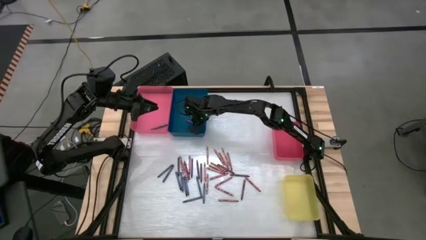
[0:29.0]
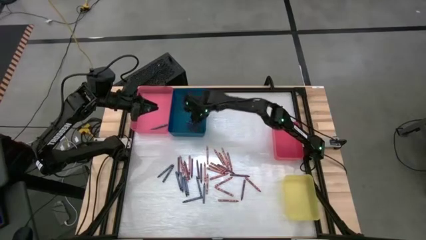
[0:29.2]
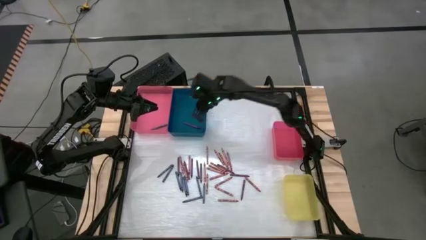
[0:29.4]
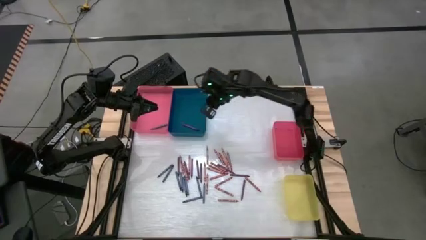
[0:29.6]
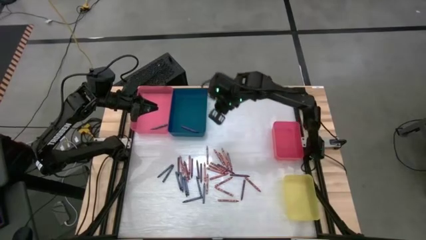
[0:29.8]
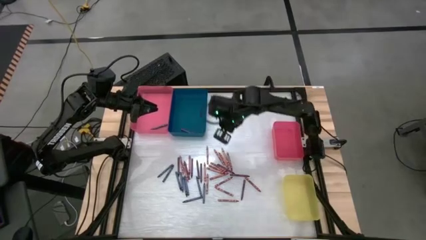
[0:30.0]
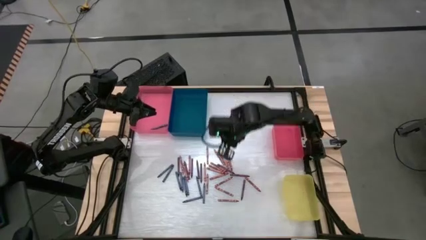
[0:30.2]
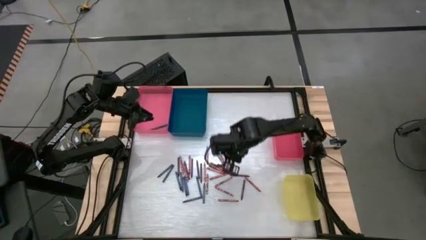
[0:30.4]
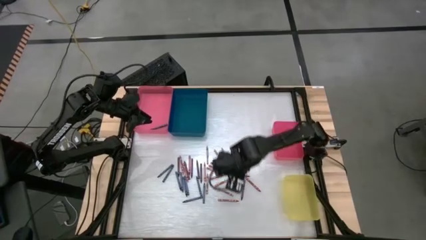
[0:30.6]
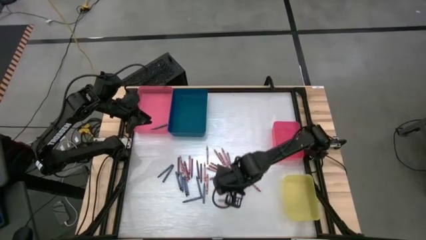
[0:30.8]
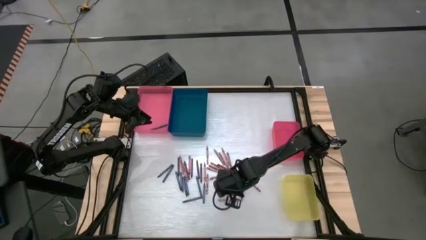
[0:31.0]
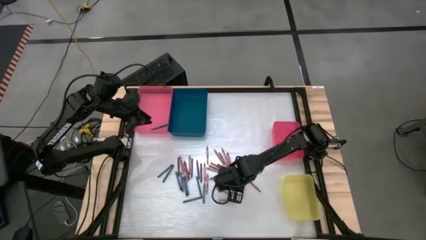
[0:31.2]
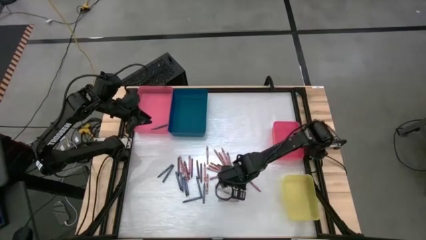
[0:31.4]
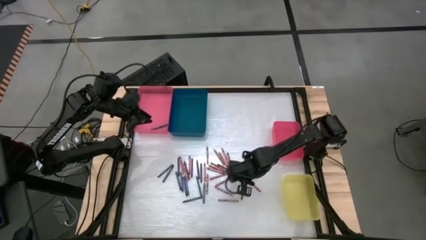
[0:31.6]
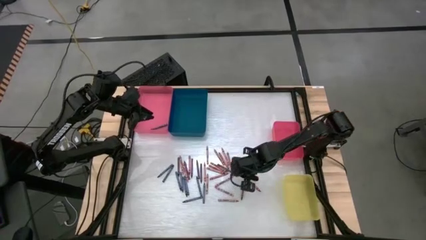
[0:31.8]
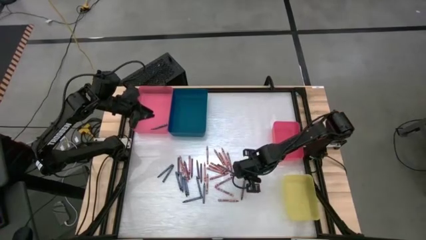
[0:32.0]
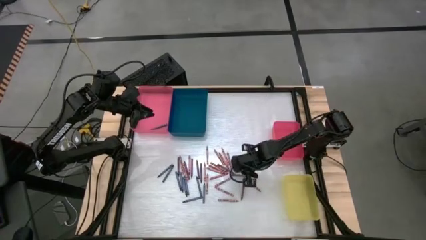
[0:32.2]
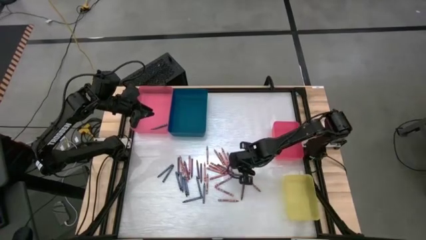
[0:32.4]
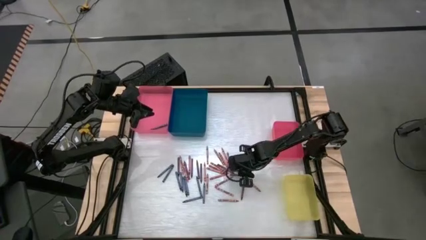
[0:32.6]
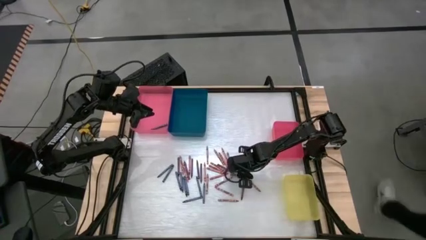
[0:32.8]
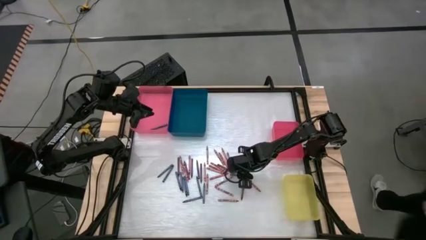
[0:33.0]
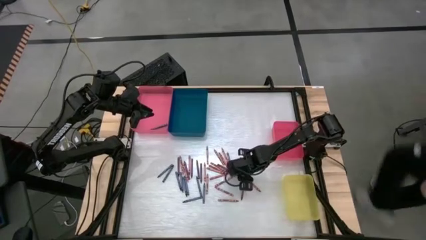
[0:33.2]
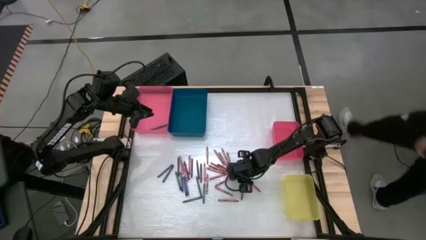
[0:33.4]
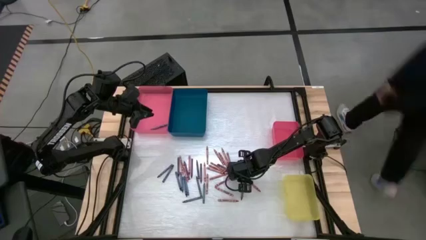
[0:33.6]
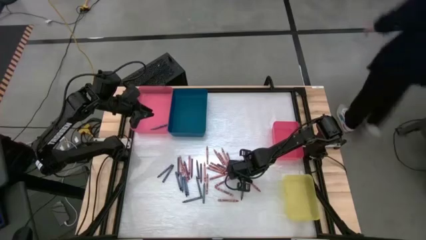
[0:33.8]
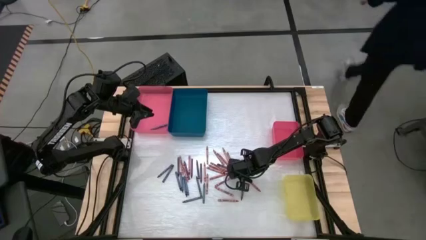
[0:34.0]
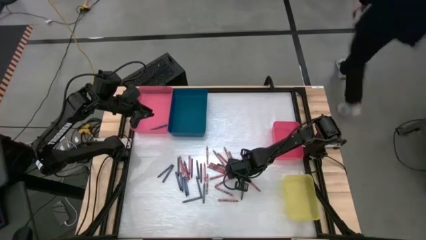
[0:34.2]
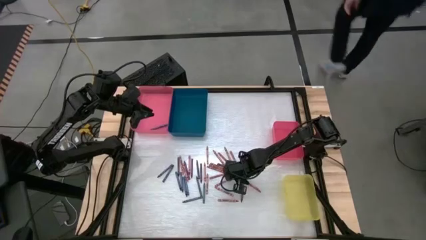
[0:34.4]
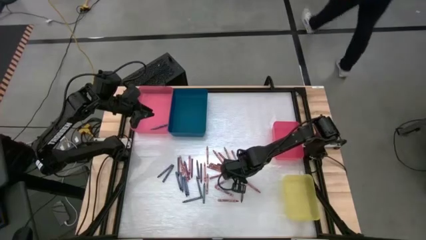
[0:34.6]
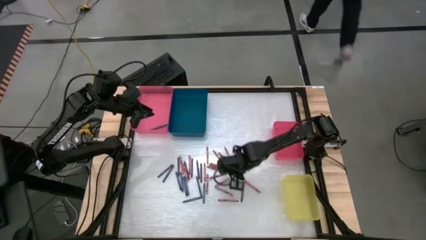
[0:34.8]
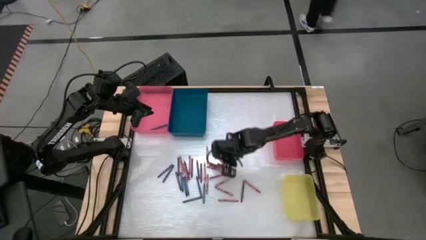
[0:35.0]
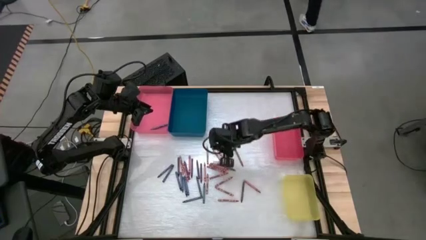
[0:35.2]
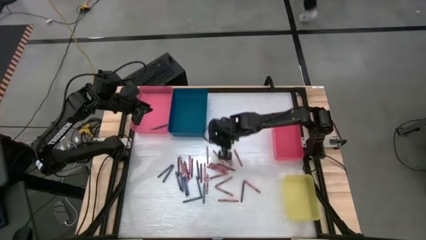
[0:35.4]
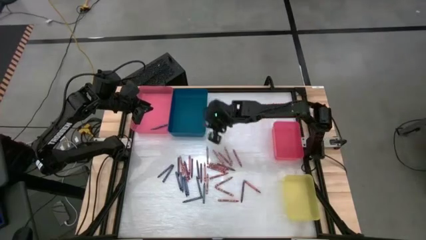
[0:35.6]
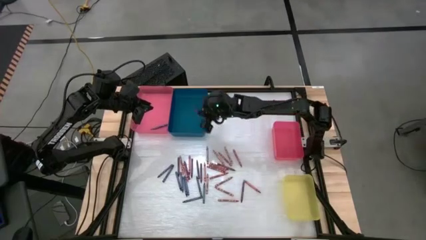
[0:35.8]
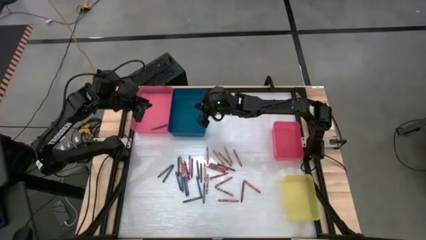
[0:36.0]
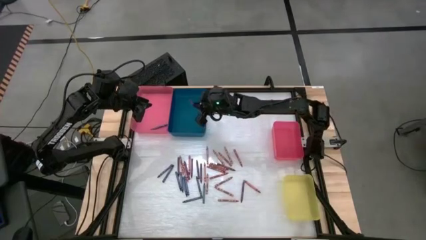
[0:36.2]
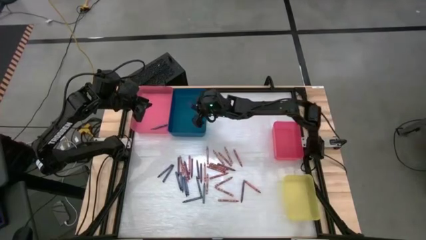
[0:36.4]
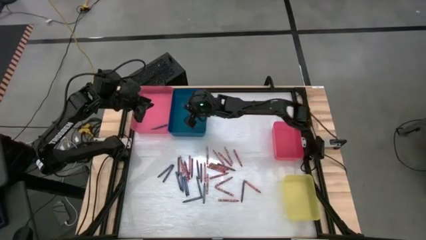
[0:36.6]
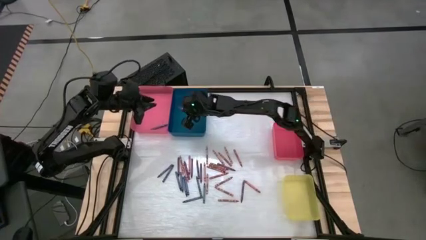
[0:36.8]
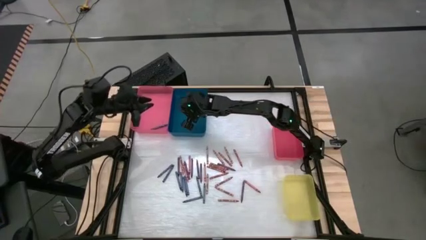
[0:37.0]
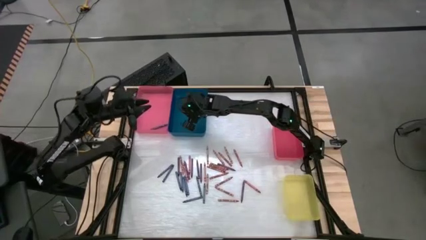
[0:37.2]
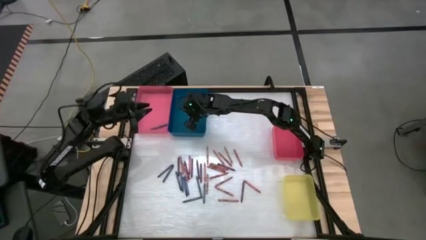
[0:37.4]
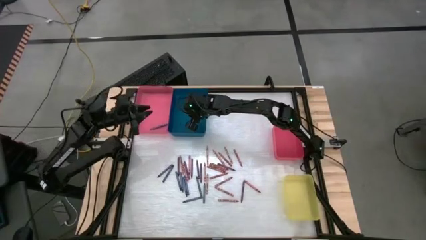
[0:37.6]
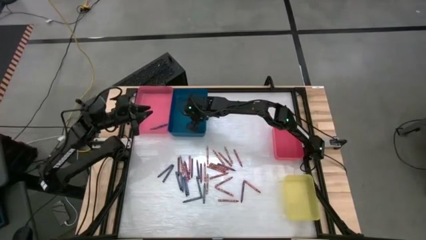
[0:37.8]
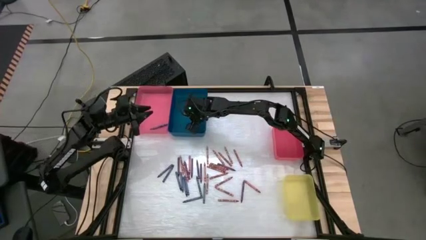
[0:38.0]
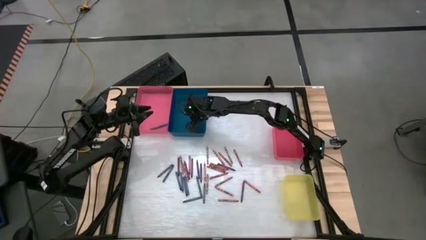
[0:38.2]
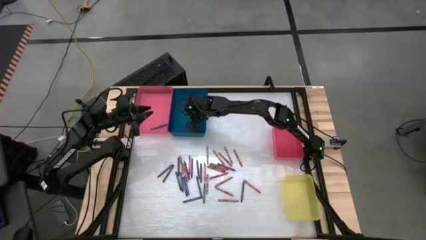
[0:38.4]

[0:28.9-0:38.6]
Task: Sort crayons
Put the purple crayon into the blue bin

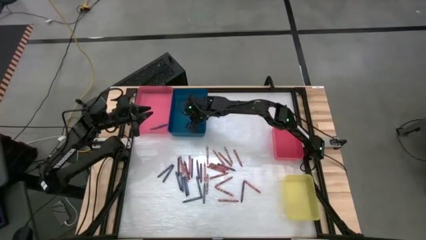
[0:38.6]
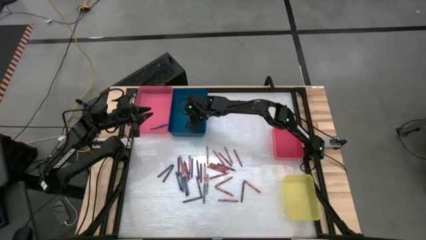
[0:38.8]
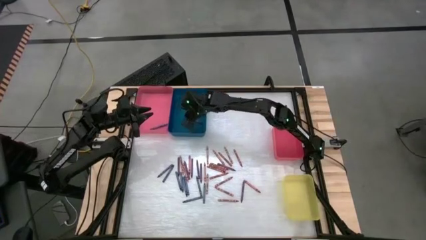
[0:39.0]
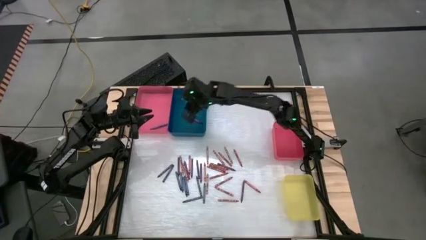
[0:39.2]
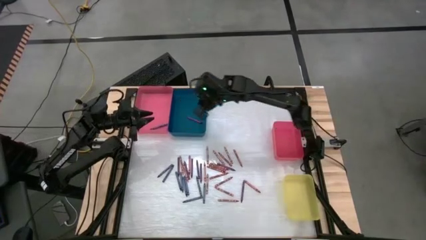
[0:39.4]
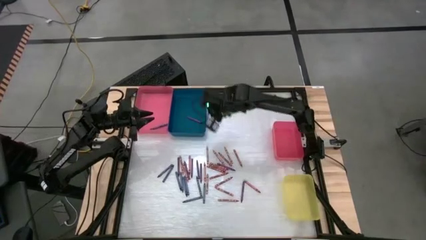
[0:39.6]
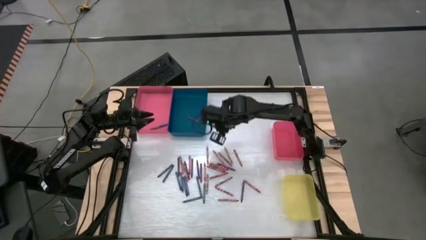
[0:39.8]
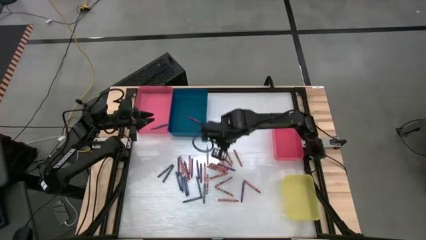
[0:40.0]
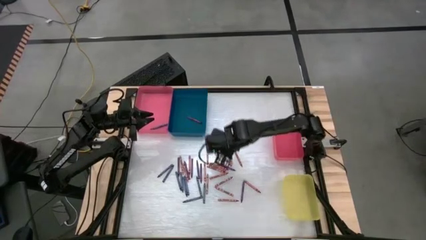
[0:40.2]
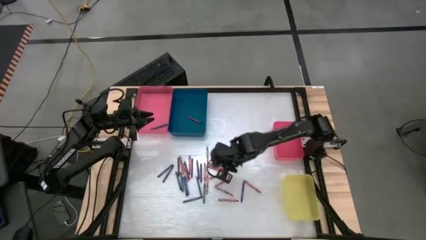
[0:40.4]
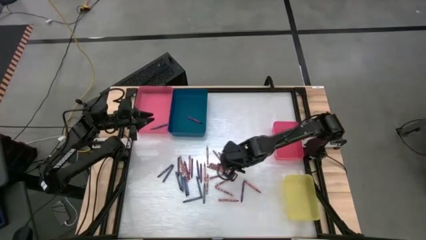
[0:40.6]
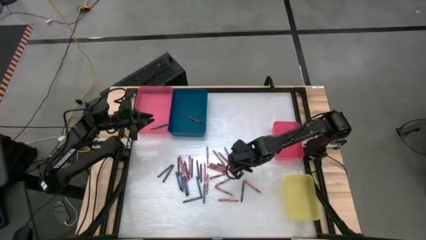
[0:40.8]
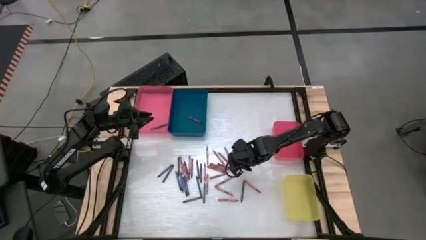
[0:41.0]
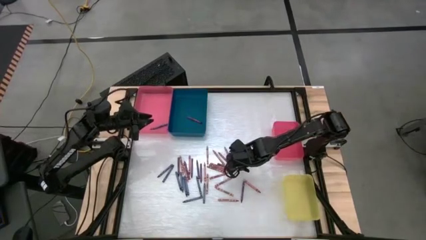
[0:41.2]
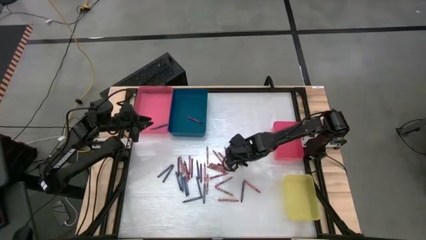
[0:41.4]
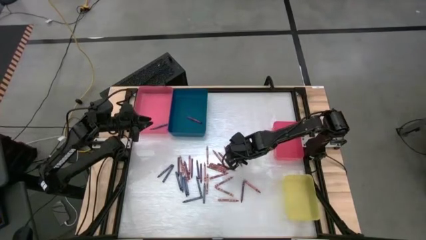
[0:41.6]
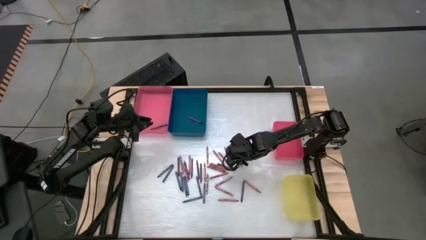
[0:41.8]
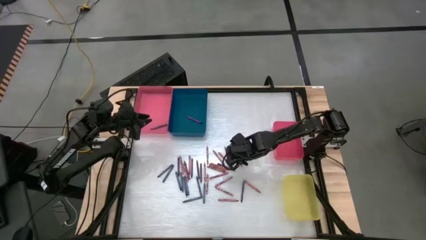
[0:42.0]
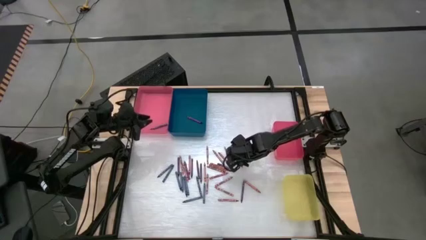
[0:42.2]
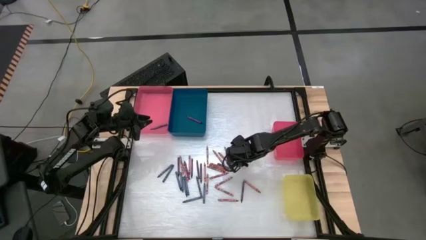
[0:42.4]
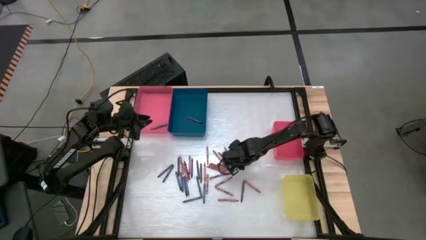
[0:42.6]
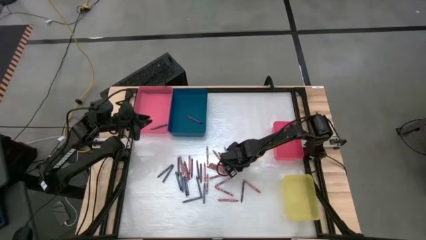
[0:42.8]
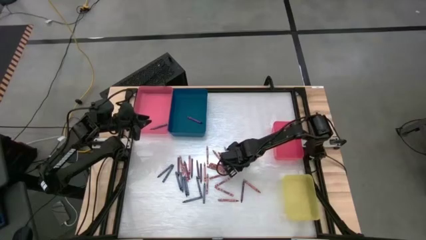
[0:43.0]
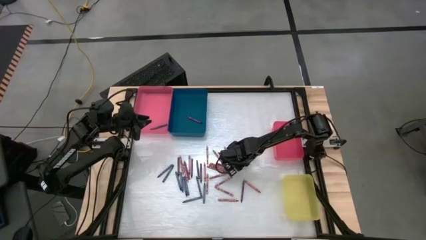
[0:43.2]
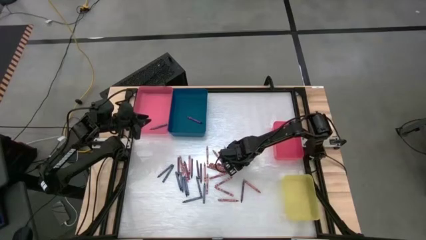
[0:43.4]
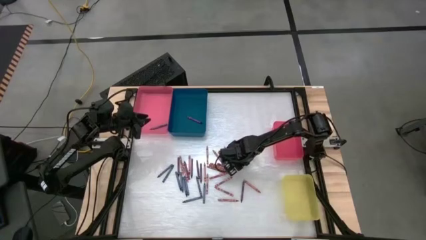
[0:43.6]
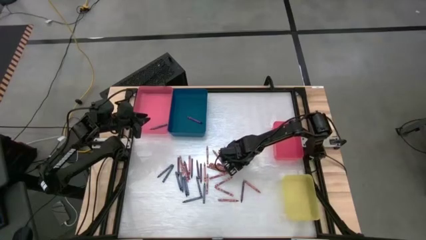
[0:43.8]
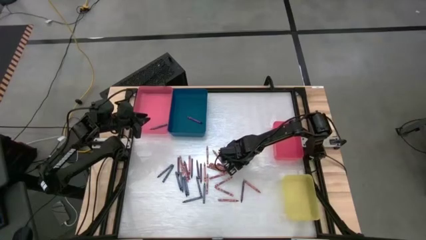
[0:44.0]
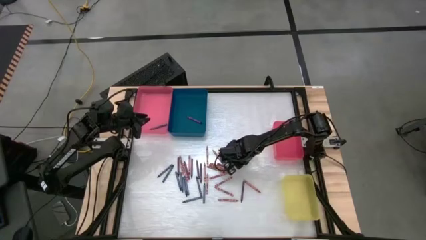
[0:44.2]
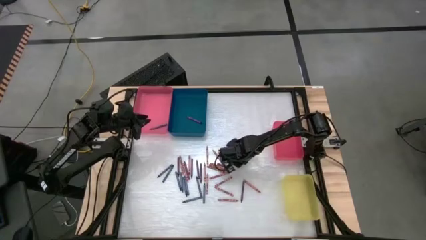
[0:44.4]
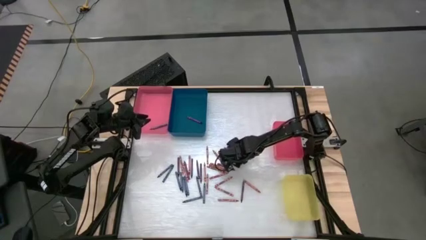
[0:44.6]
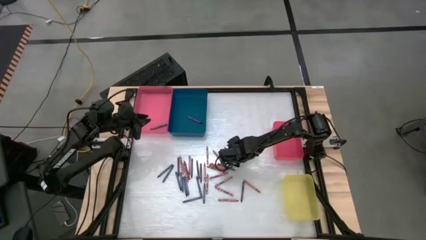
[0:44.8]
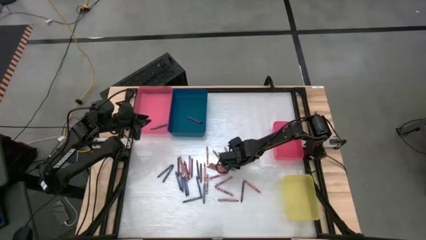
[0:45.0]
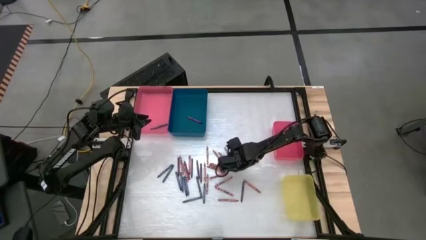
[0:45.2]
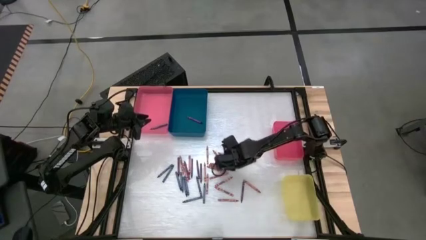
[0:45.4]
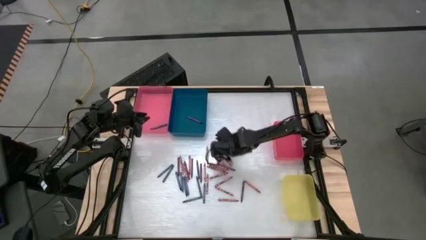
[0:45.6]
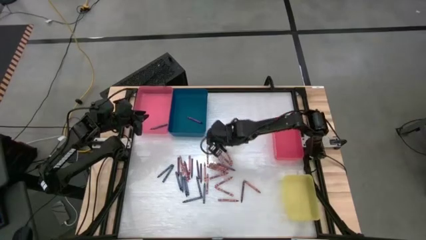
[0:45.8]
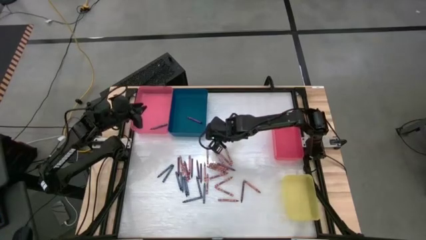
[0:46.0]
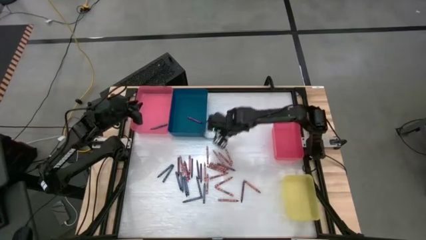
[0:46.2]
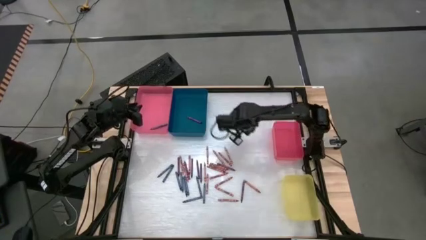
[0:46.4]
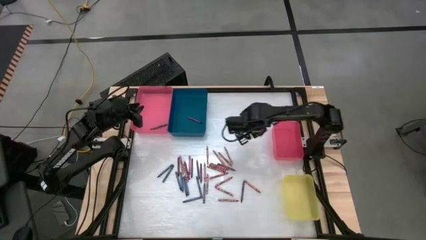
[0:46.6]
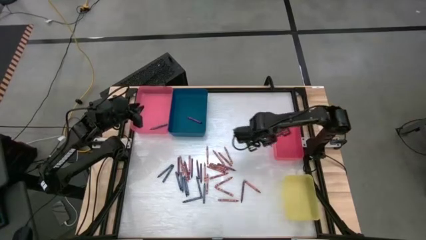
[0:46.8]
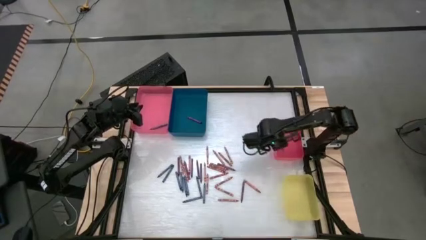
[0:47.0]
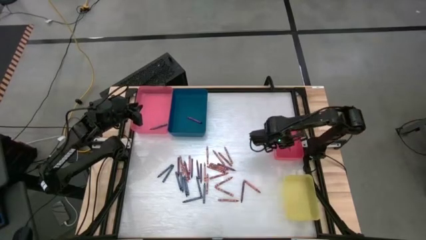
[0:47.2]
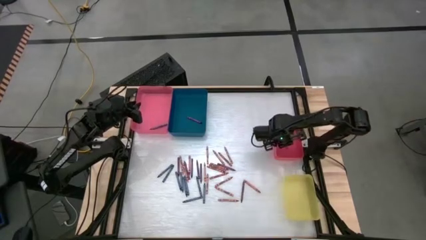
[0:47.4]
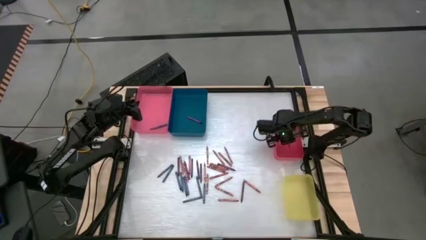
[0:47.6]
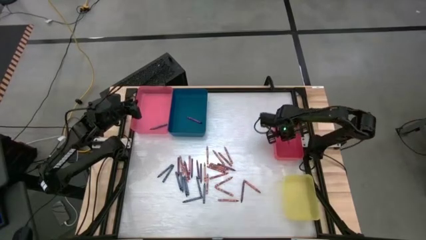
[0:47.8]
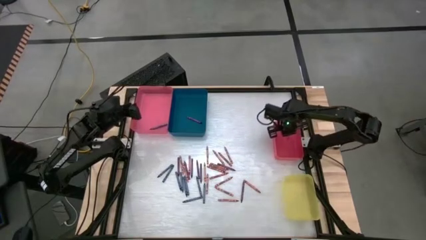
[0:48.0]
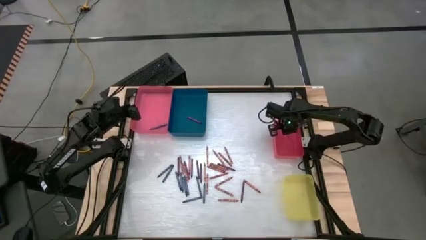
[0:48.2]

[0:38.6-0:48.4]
Put the red crayon into the small red bin
